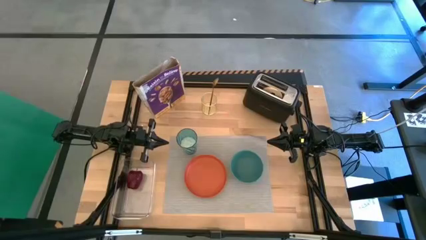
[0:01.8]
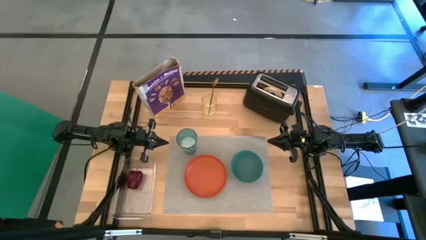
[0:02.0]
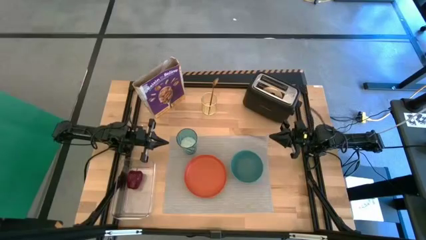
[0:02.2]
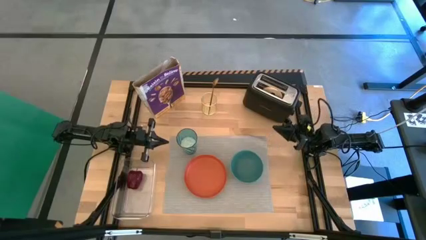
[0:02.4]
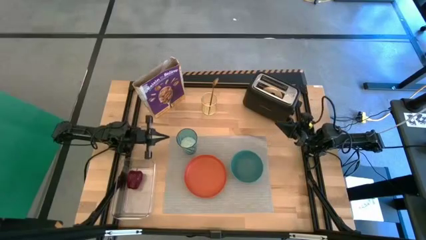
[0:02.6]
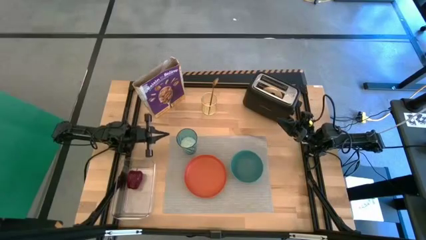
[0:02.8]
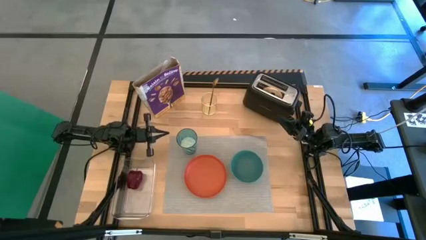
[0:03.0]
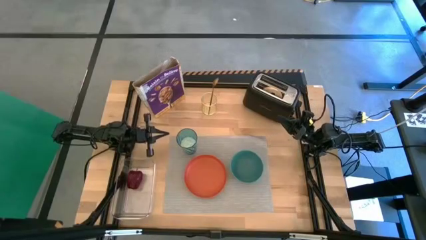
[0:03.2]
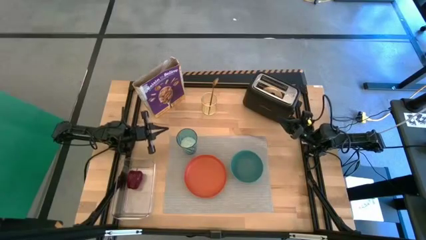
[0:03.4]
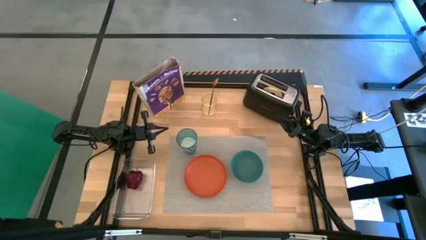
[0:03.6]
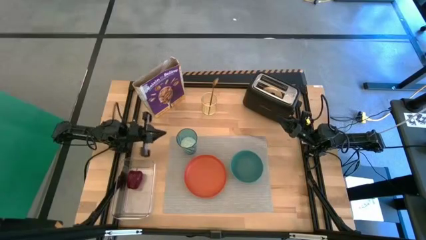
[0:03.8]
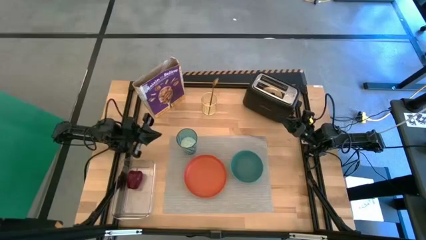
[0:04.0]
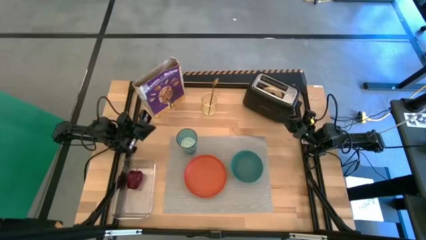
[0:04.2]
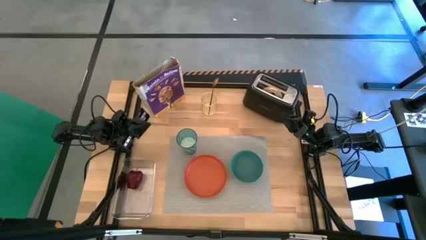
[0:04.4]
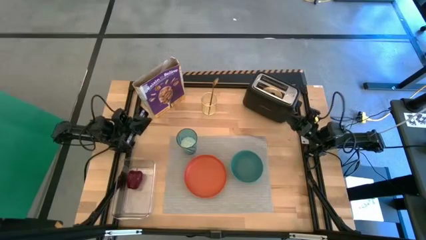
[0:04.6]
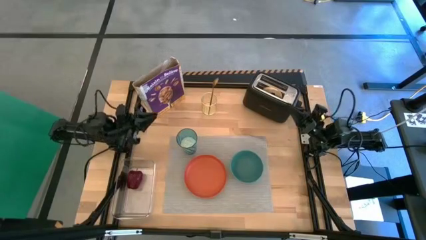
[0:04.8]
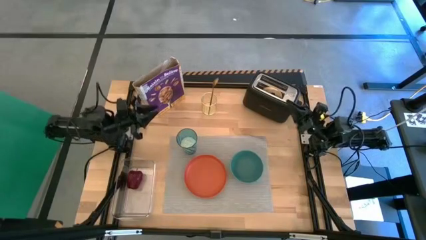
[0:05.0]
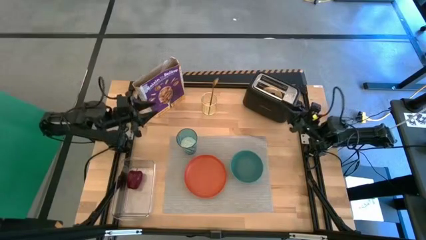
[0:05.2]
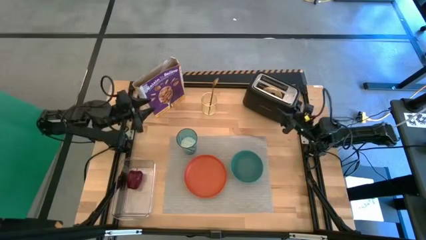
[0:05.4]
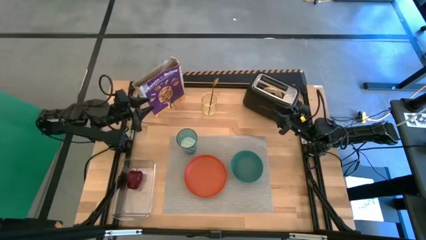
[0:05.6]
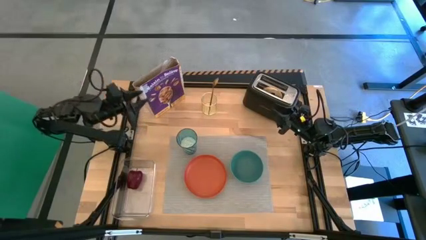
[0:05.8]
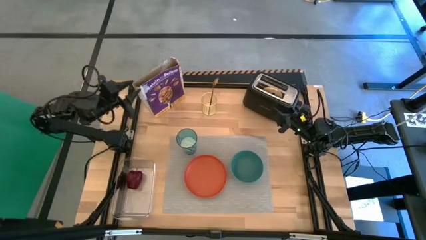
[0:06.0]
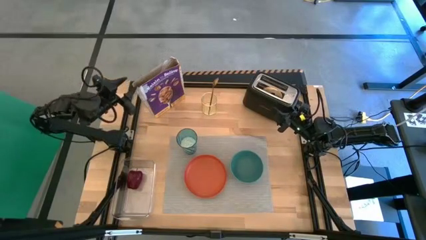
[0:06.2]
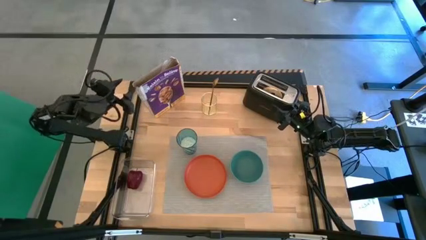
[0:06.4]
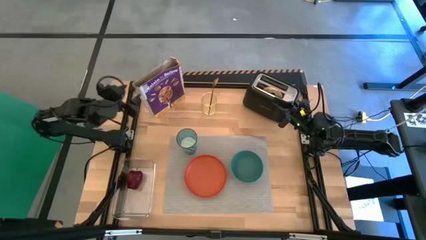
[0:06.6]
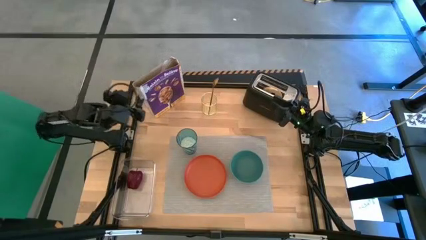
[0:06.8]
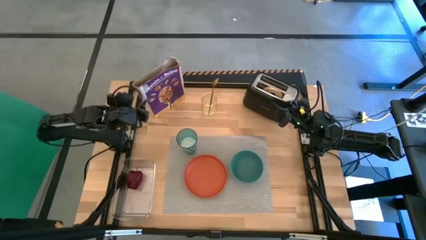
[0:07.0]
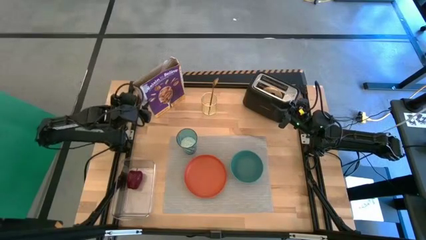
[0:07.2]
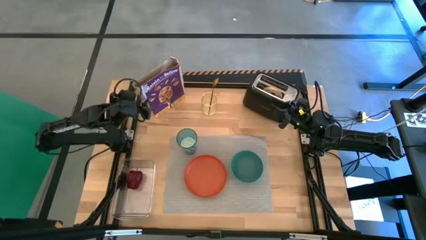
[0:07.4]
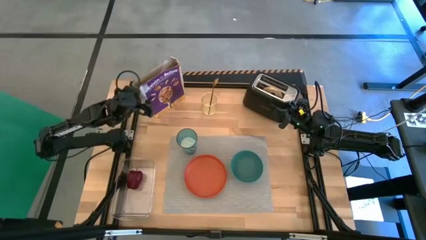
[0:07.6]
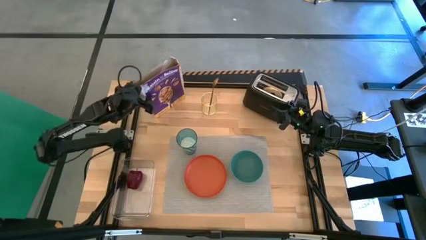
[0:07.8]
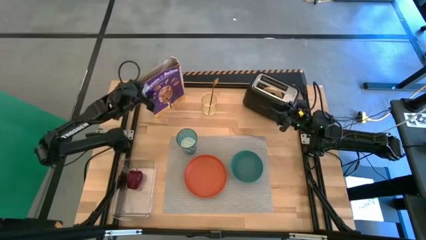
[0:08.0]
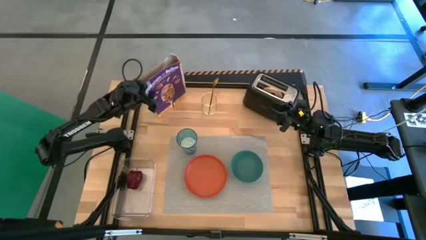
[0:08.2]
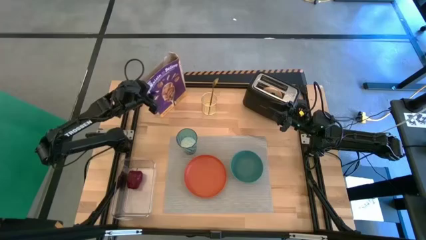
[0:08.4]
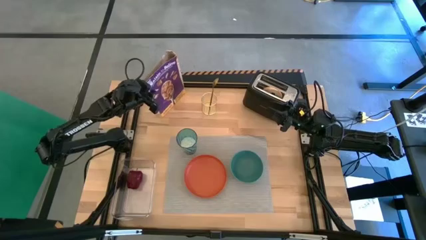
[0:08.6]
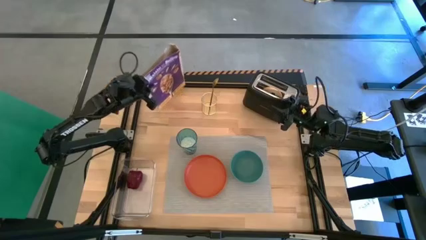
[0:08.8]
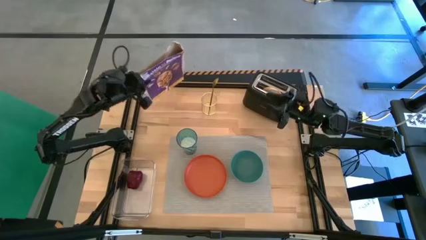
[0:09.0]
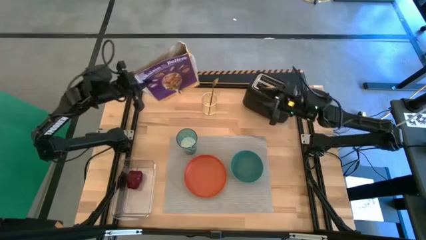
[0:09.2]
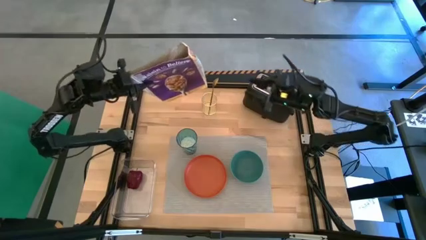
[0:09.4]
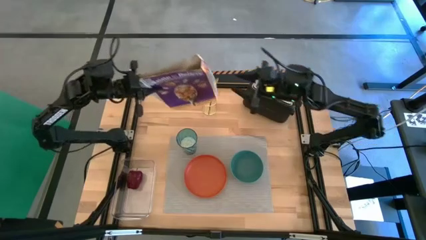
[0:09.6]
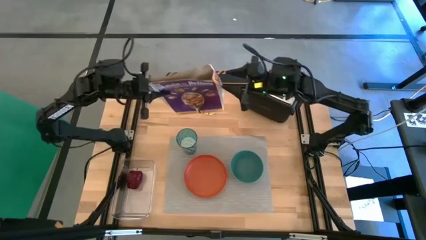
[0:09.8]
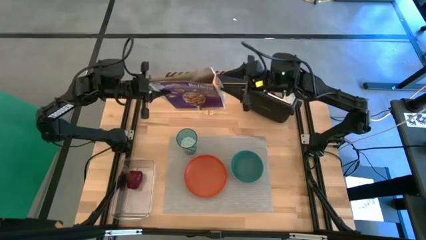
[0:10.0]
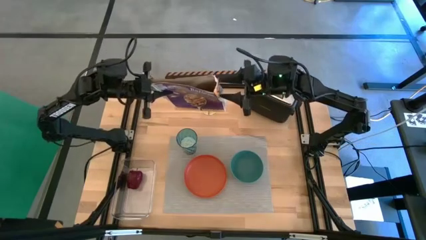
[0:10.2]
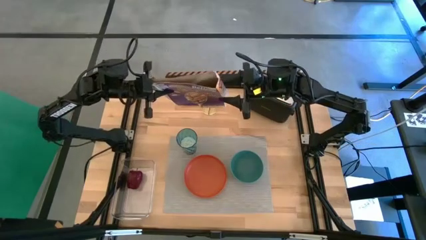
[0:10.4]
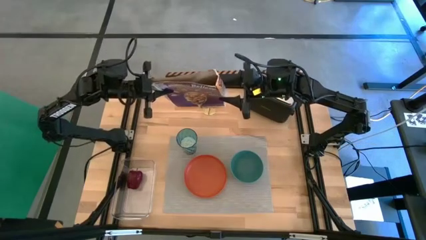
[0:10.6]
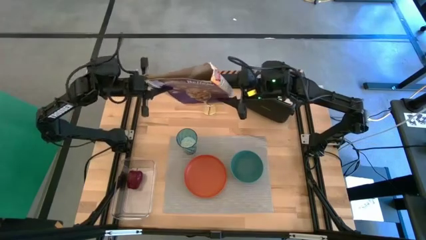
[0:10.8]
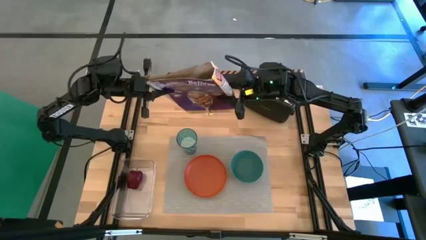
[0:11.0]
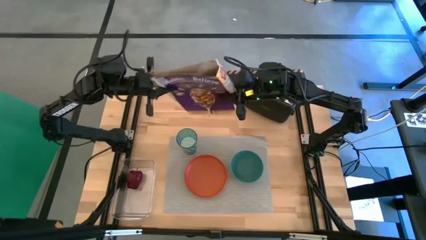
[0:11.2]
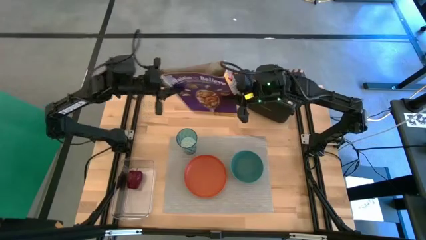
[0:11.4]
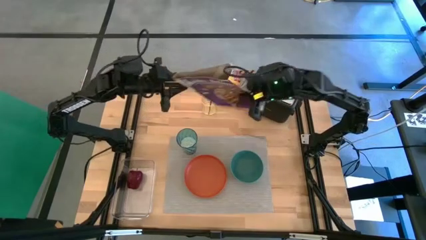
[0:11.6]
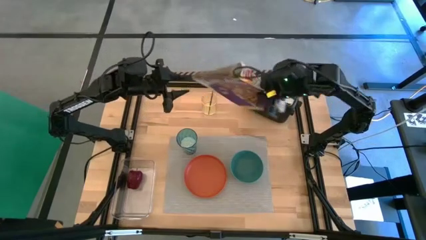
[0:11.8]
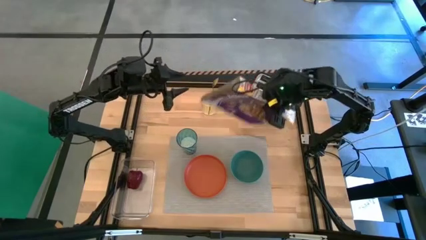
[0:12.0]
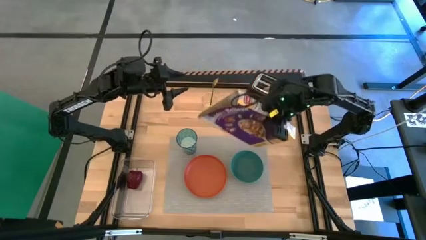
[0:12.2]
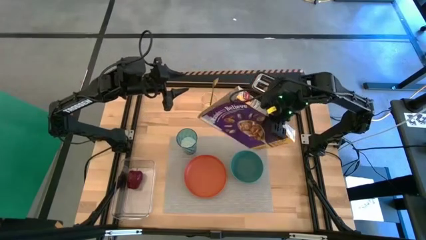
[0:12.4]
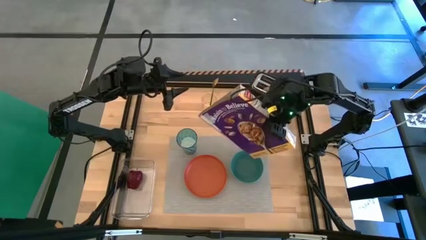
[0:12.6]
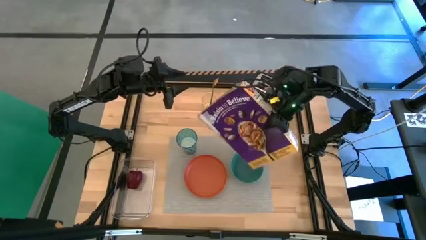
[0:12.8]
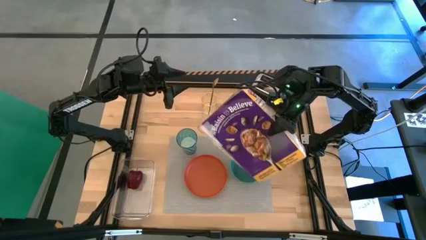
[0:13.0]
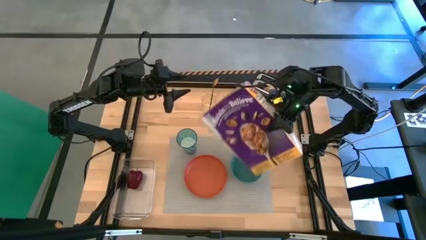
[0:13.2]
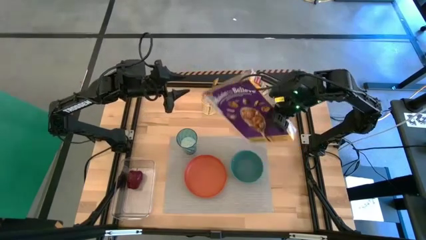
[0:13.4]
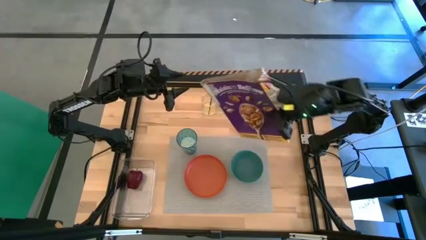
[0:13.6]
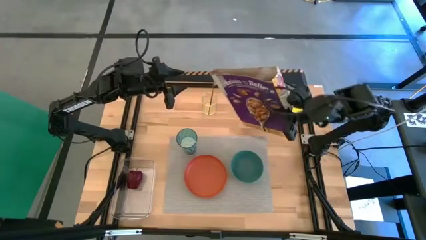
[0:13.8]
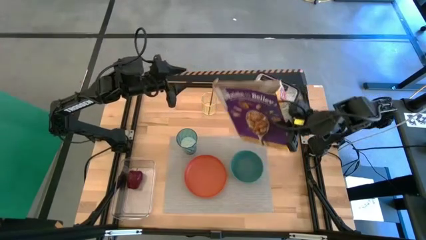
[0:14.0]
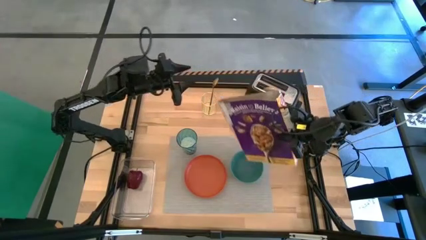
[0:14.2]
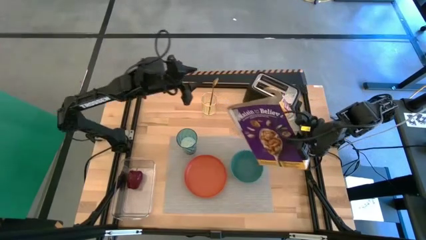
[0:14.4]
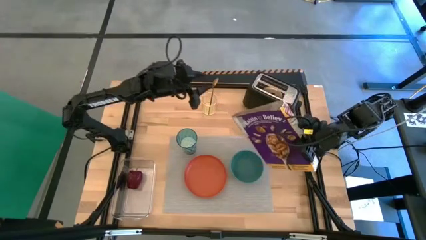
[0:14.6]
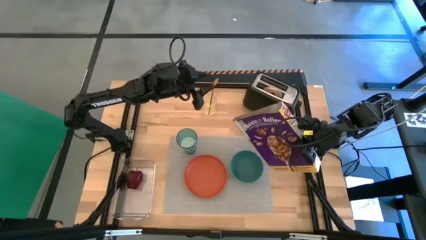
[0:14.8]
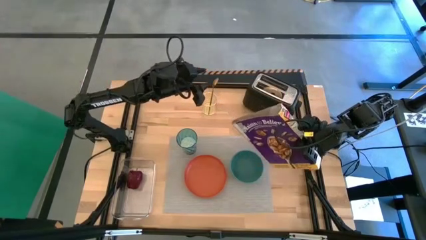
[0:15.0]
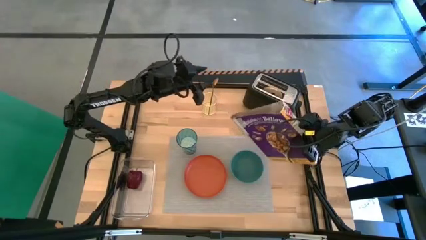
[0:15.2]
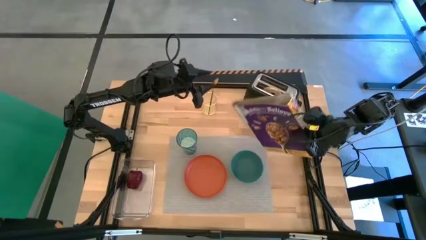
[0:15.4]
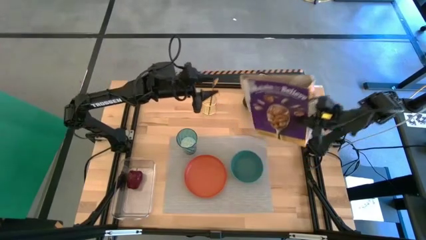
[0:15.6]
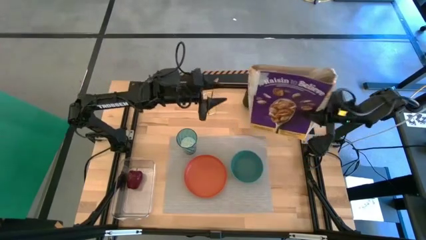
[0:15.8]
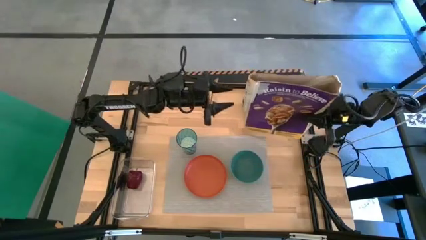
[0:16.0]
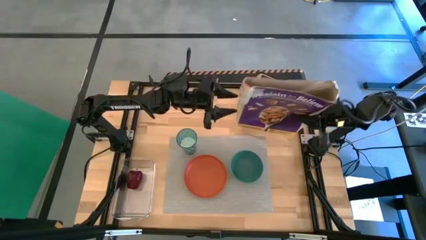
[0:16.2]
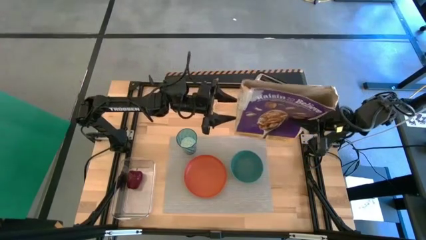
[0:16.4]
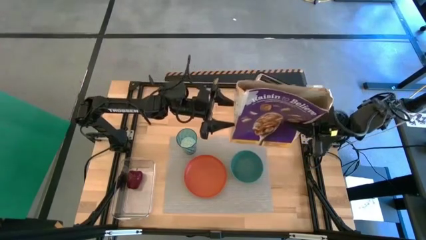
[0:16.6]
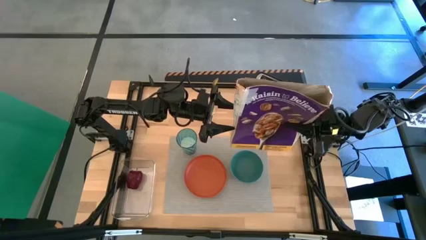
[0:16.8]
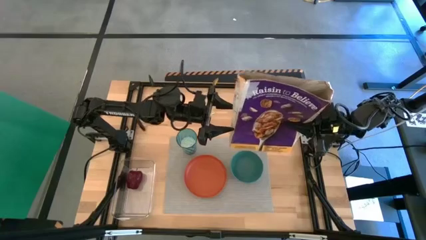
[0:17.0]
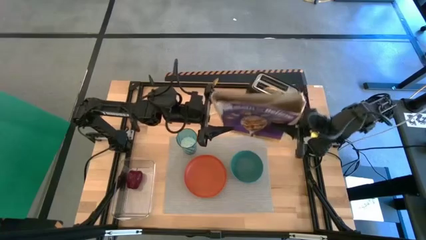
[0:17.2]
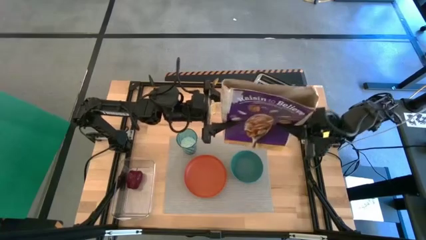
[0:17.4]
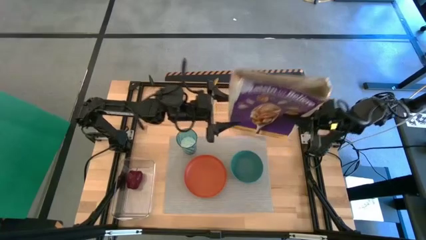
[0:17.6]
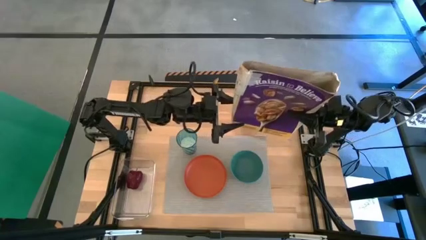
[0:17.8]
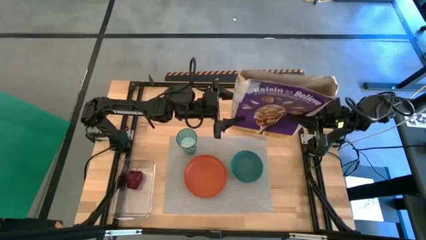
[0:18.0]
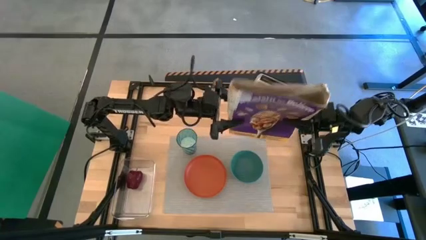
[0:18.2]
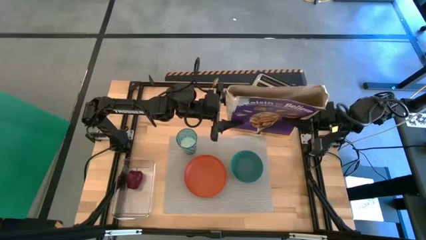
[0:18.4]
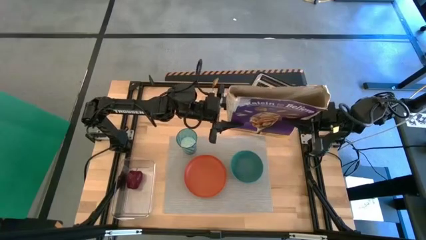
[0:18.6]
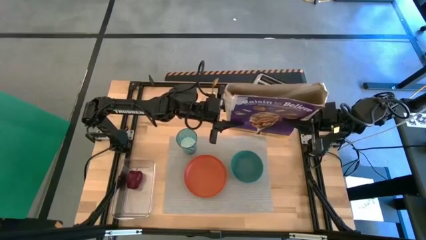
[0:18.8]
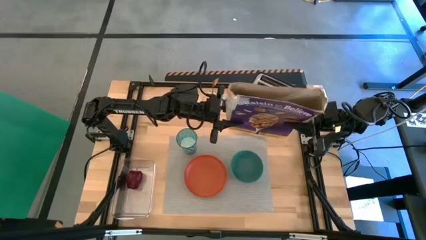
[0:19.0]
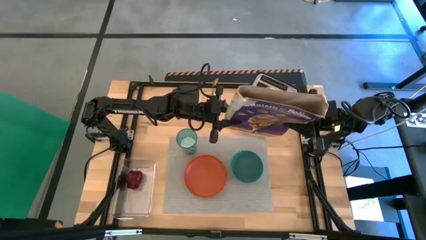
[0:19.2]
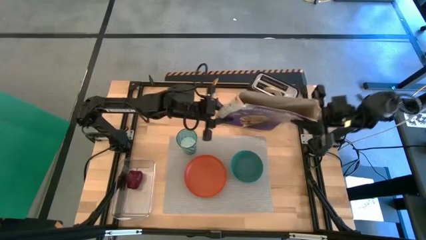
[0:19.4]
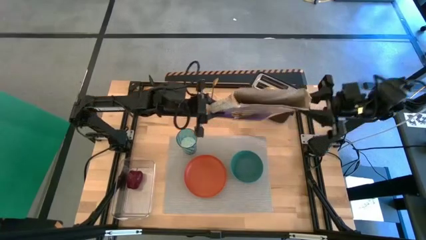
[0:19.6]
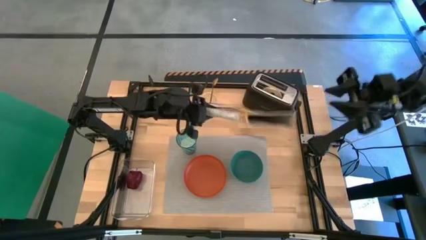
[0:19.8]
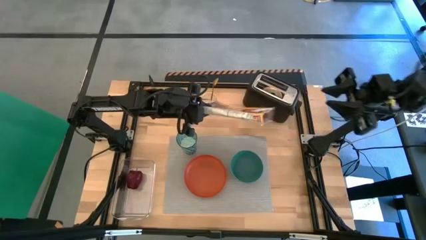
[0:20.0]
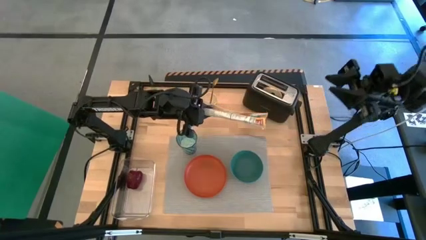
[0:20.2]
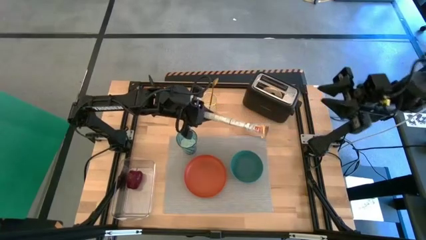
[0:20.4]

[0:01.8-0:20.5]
Task: Arrange a breakfast setting
Pour the cereal from the cereal box into the blue bowl
